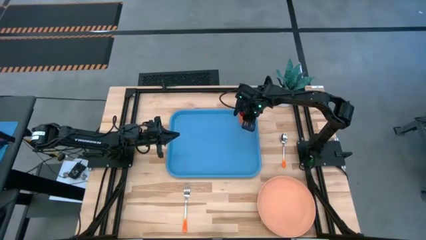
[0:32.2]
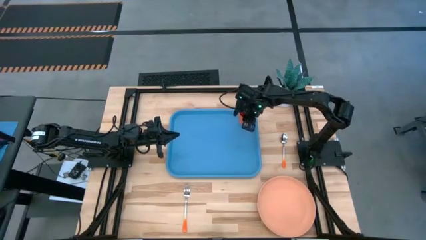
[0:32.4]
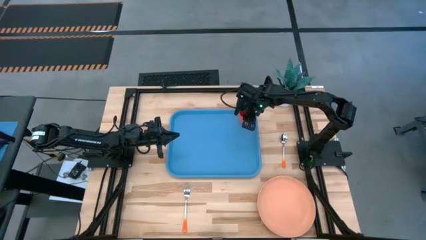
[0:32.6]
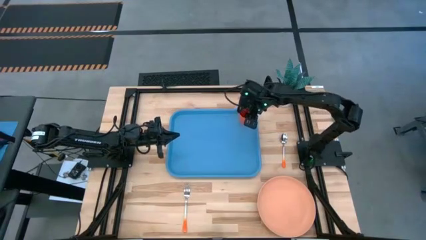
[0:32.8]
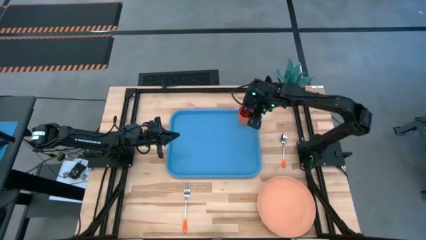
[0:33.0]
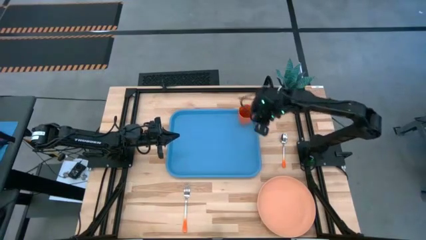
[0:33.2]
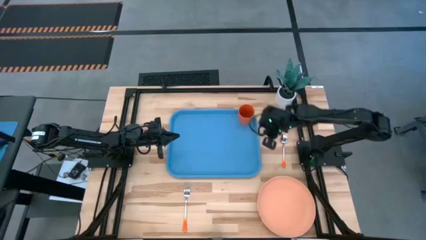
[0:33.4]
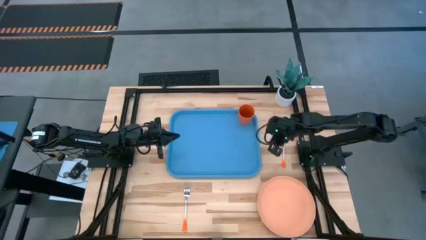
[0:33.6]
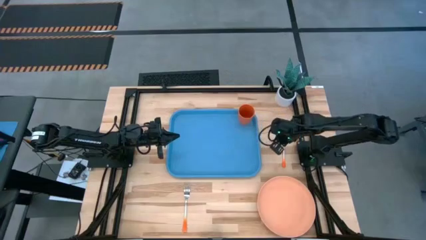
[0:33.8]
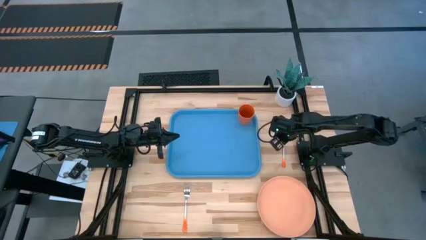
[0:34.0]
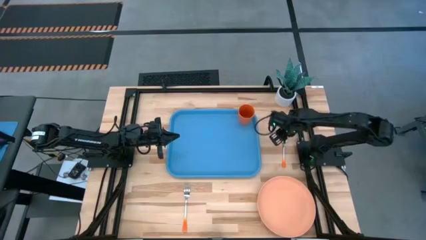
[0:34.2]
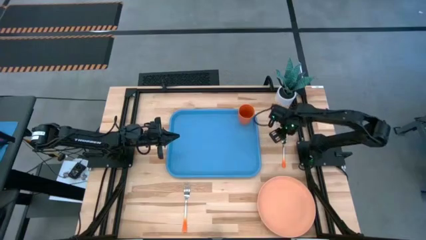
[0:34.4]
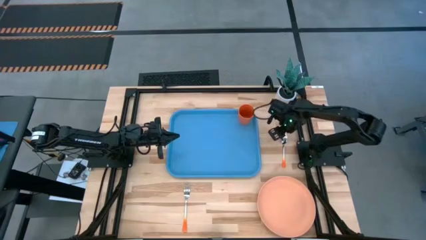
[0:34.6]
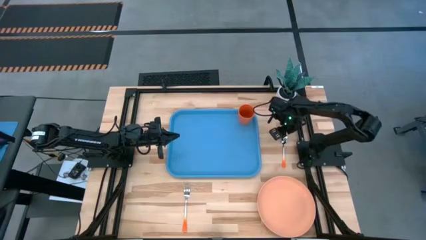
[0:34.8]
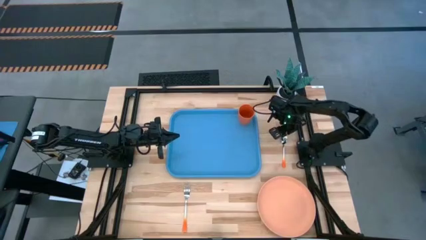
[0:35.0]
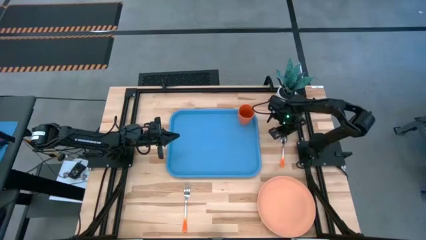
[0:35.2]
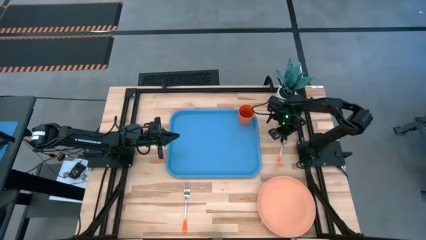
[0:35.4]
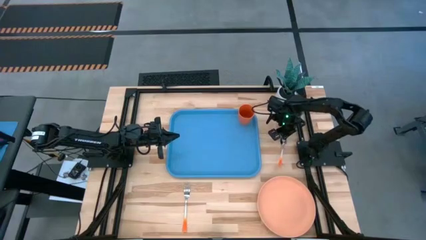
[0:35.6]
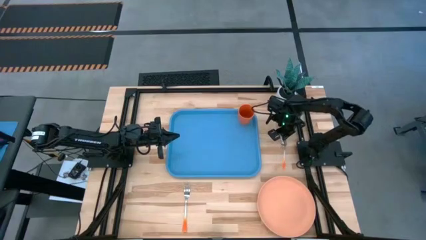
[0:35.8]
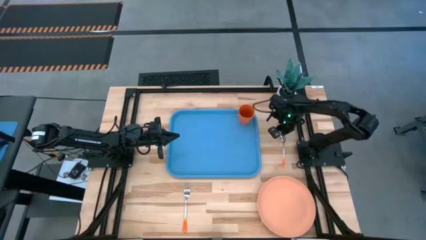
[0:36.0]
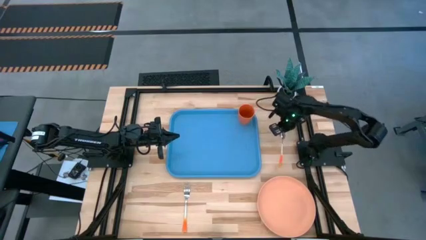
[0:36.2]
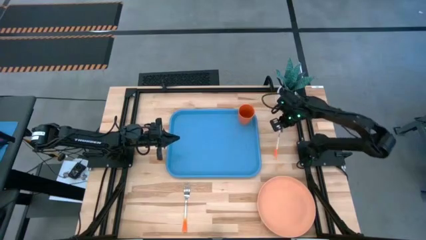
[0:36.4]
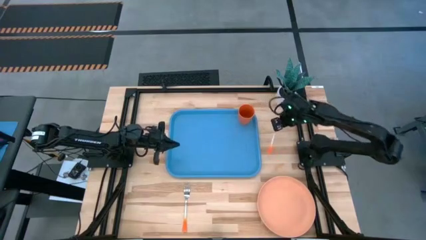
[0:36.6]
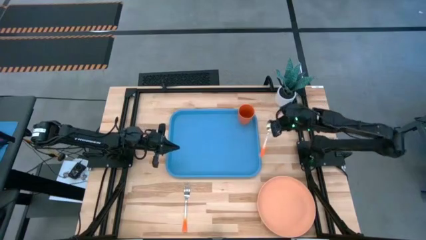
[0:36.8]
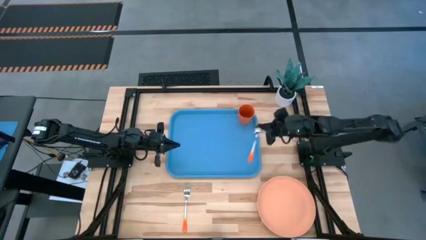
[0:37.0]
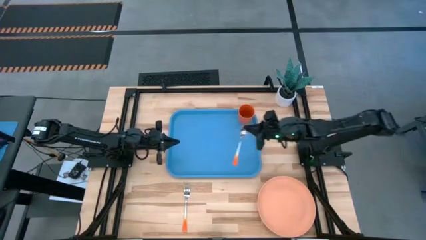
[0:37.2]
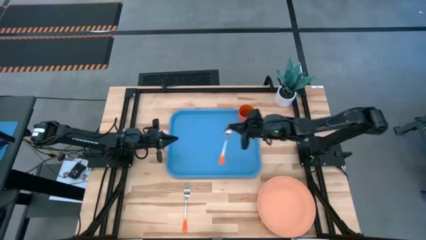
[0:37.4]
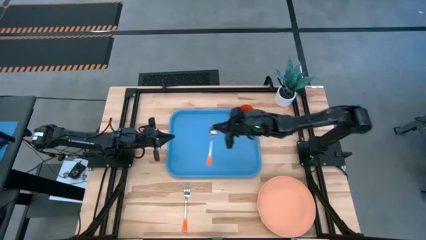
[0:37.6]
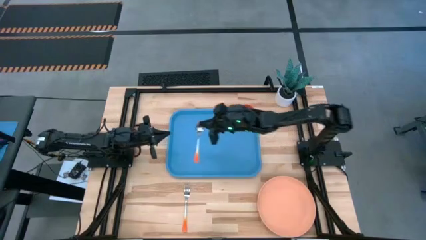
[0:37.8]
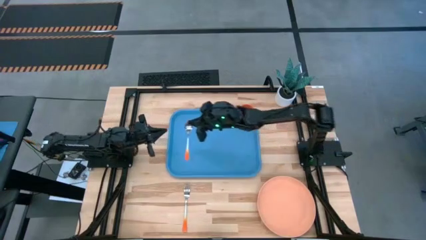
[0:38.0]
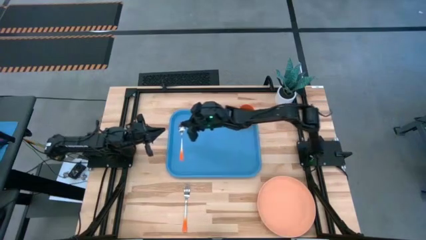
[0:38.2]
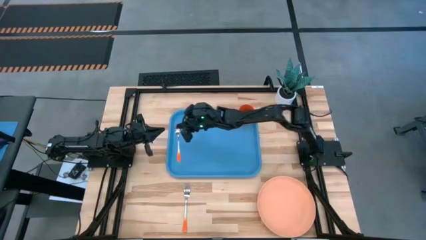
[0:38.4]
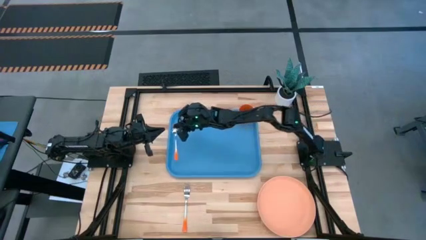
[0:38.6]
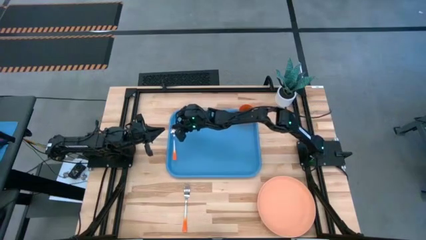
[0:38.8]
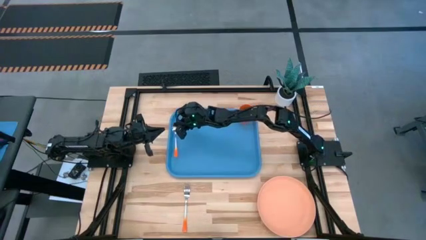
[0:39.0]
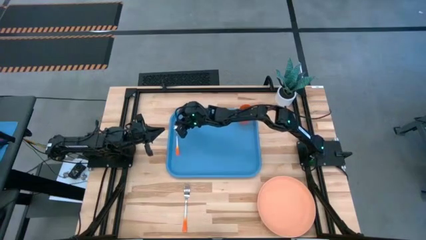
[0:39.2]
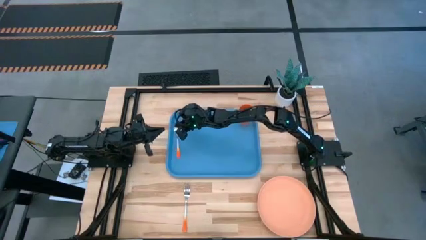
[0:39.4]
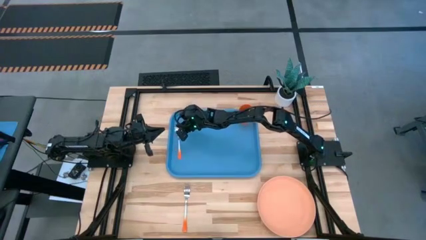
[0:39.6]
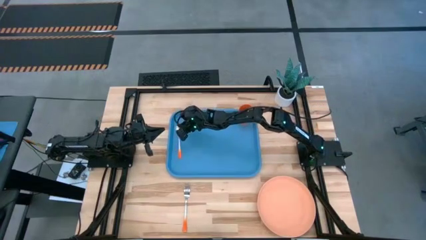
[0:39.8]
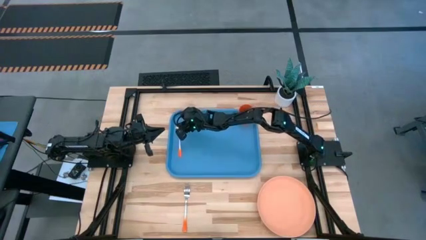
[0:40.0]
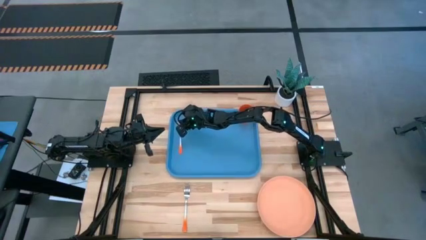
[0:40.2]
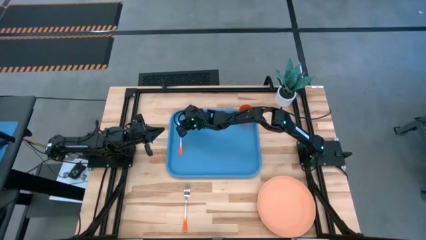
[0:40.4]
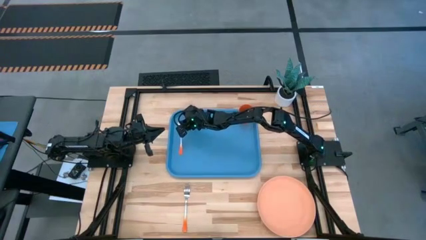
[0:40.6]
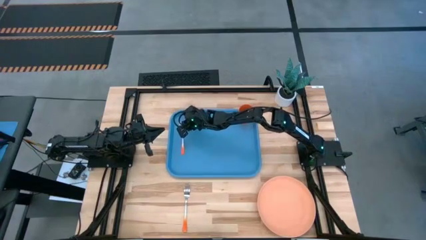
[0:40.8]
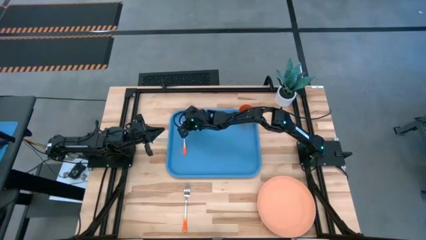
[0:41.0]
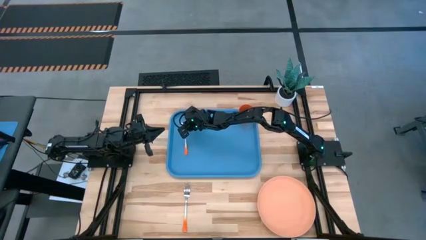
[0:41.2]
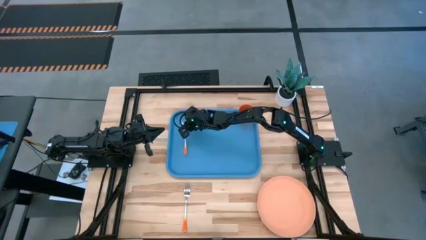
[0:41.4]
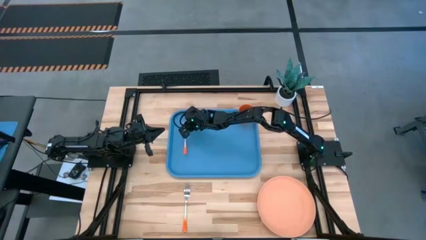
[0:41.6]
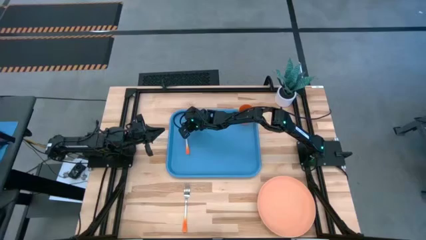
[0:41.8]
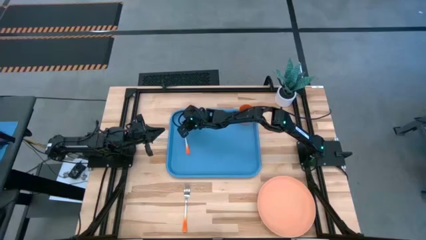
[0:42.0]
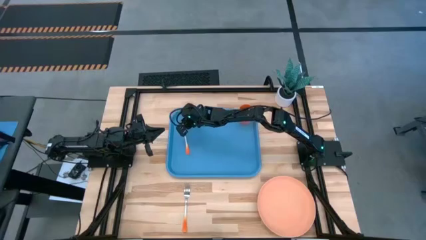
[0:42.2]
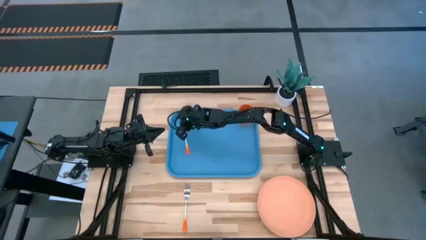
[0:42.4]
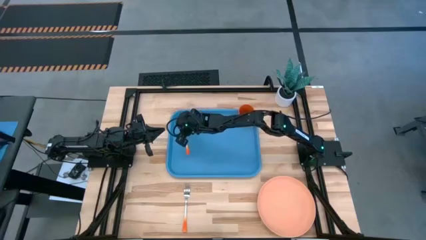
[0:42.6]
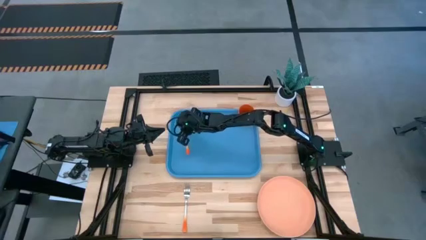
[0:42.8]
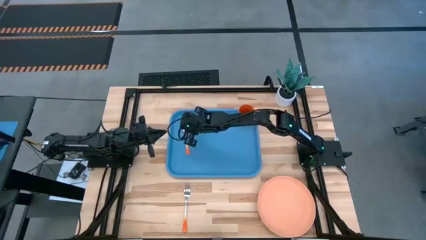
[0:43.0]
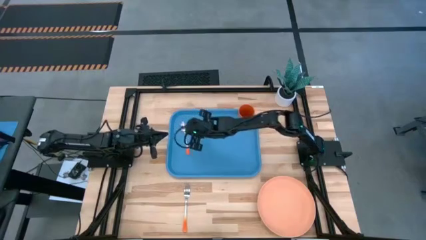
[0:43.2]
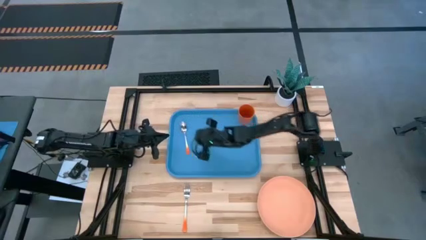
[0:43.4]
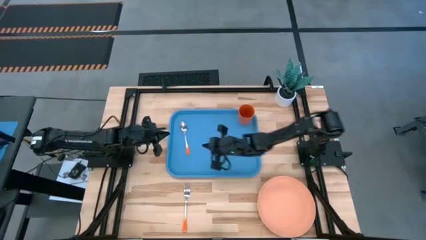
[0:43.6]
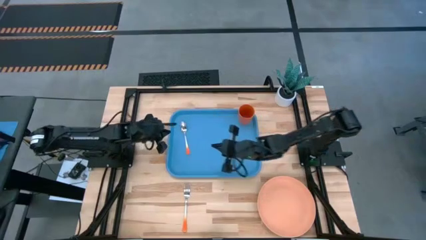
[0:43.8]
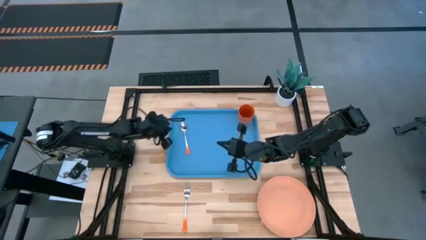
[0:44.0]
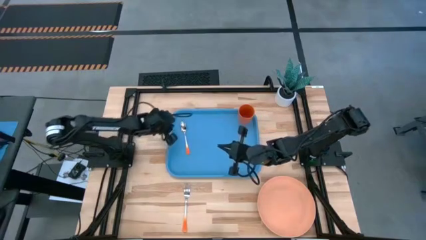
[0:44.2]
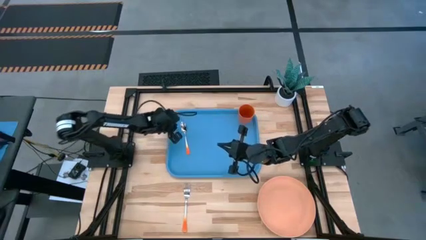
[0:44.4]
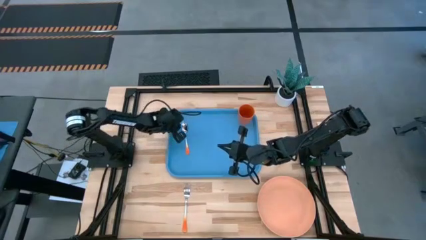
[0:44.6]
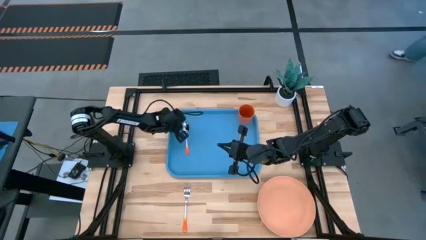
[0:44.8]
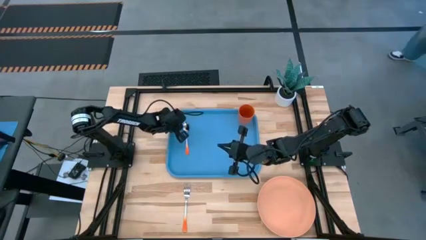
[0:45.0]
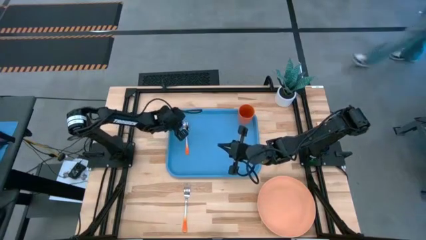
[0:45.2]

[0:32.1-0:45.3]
Task: Pick and place plate/cup/fork/spoon on tray
Put the orange spoon on the blue tray

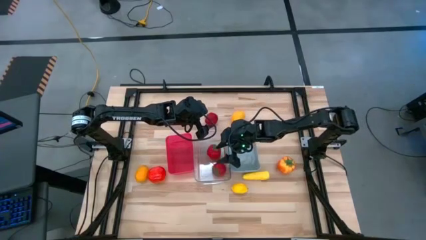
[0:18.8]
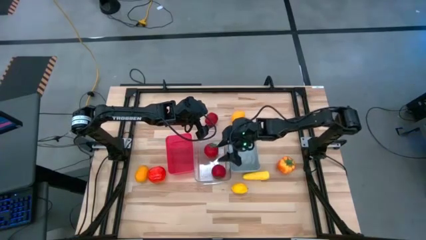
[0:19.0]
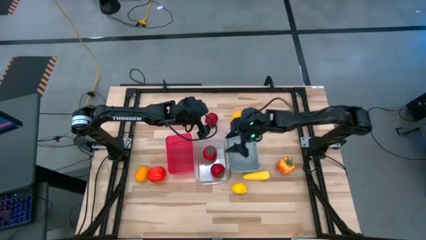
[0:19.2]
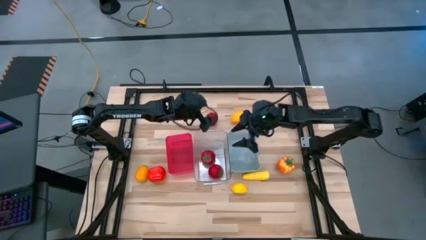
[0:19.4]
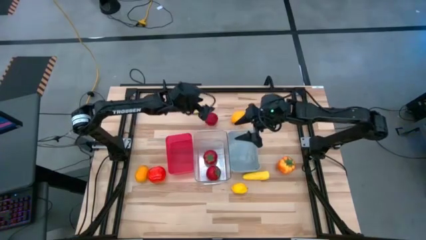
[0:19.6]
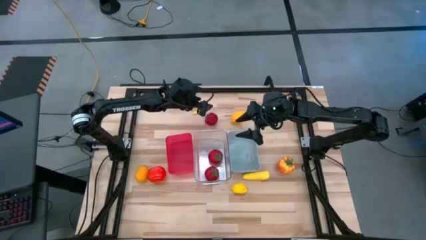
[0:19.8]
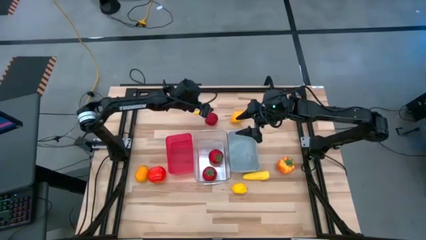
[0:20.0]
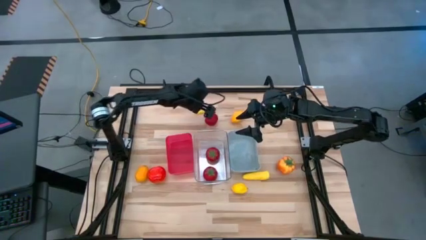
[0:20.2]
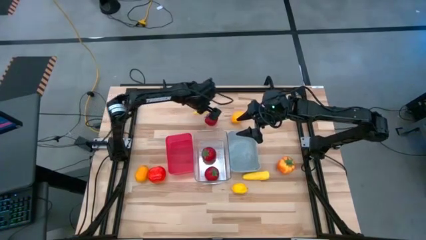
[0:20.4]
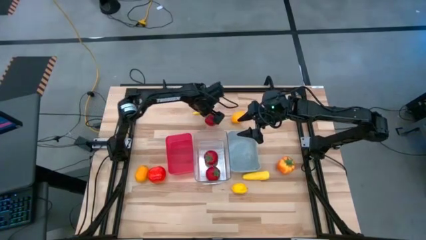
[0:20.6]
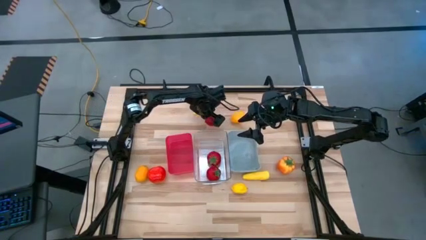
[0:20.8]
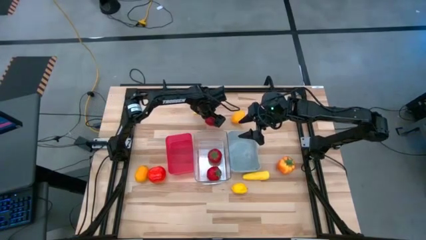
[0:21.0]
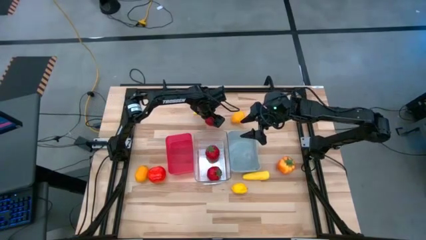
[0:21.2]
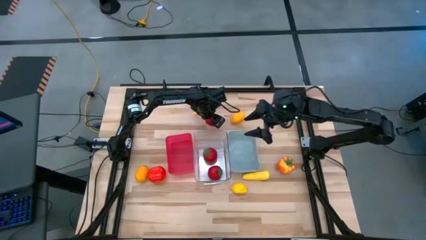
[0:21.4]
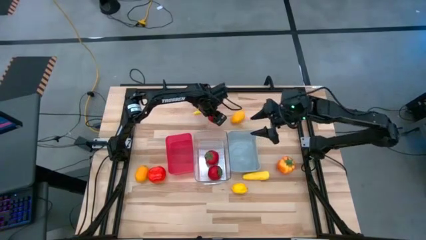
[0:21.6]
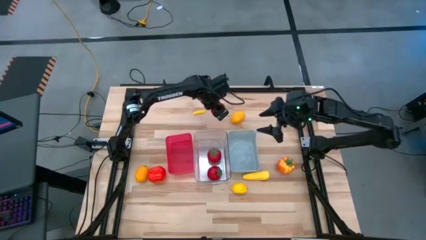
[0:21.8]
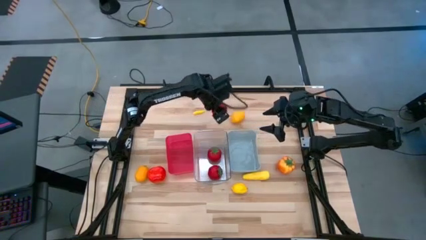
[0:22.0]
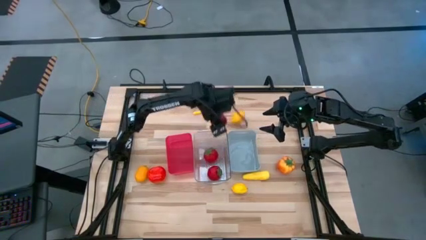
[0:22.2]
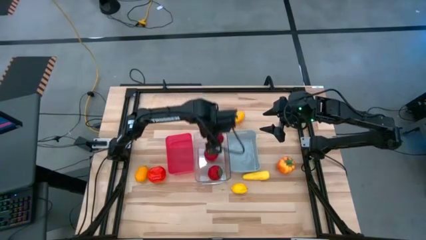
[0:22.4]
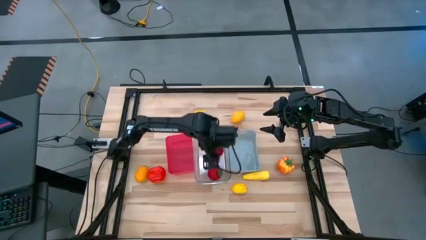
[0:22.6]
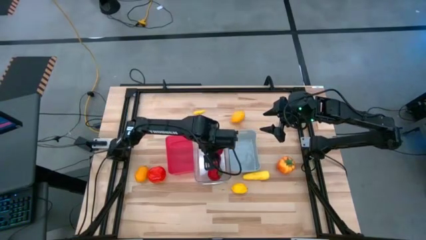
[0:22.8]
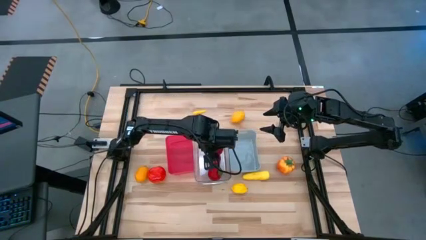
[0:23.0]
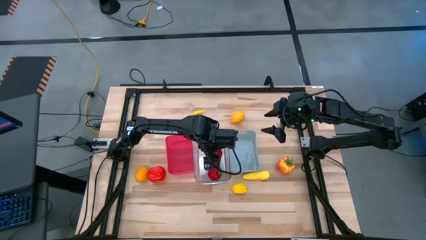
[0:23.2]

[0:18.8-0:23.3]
Task: Sort produce into baskets
Put the red tomato into the transparent bin
